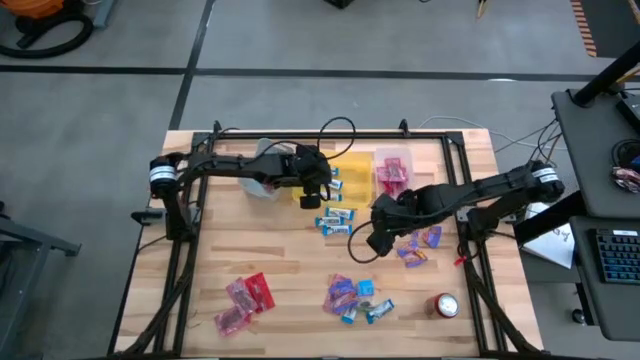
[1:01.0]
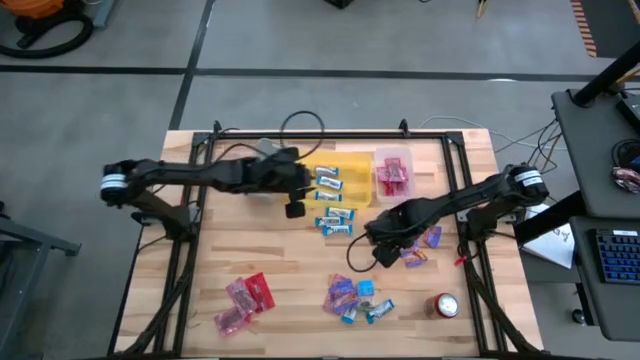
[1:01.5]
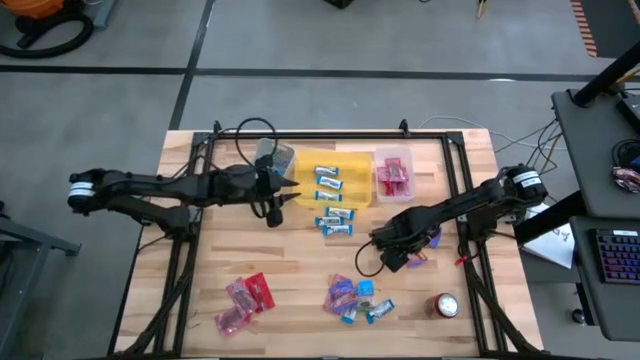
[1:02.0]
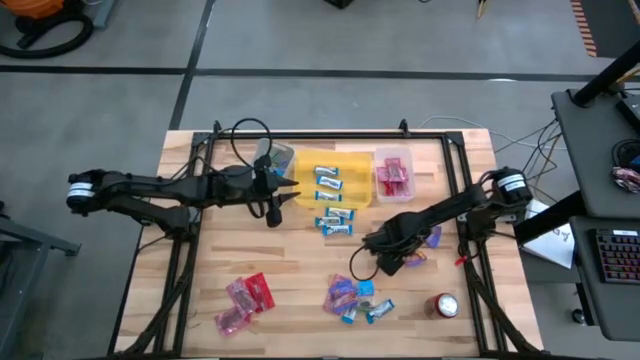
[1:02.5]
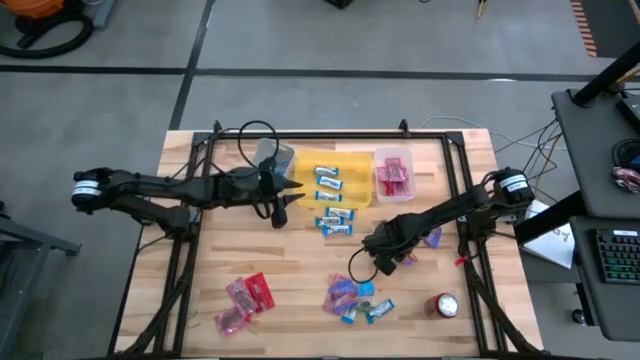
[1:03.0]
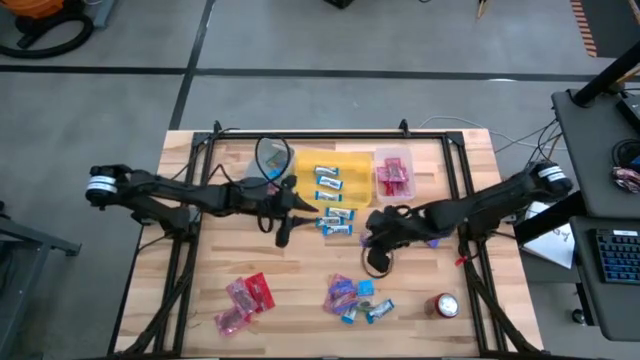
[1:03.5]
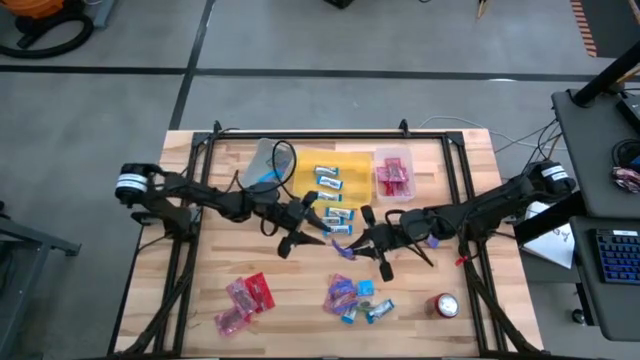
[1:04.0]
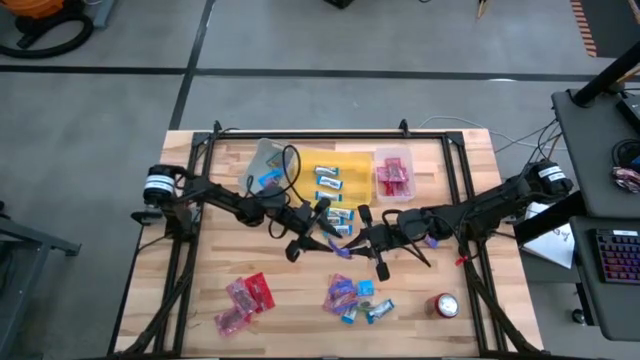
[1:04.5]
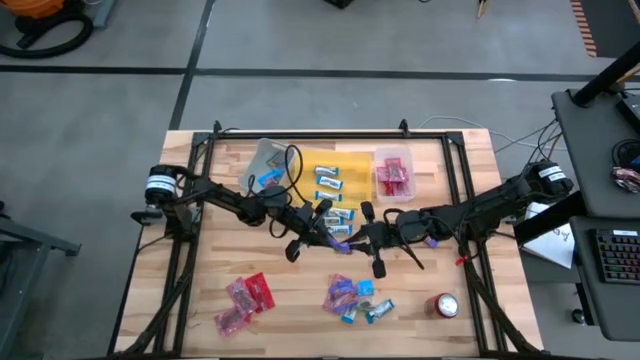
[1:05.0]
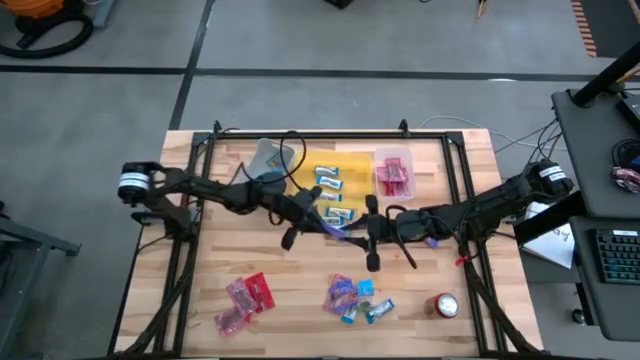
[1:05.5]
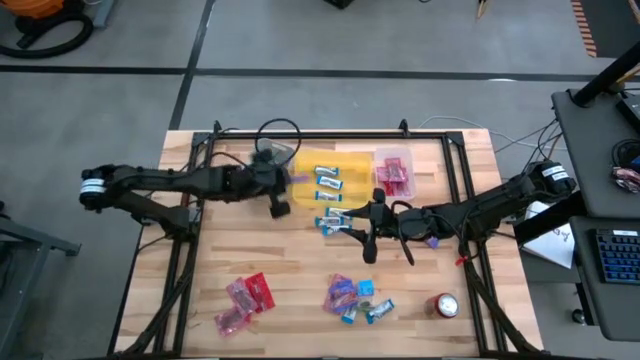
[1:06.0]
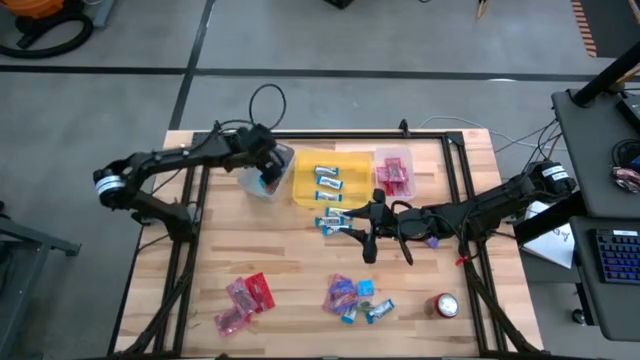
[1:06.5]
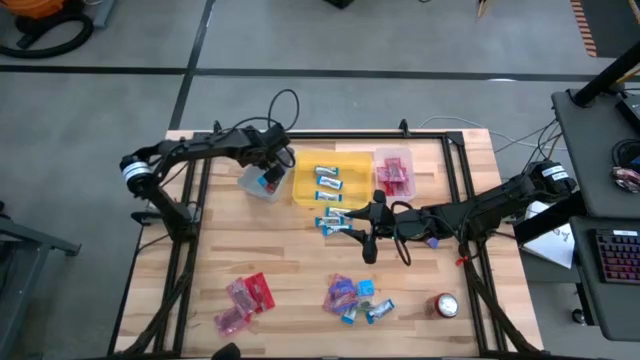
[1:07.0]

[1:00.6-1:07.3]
Task: Sort candy
Put the blue candy into the gray bin

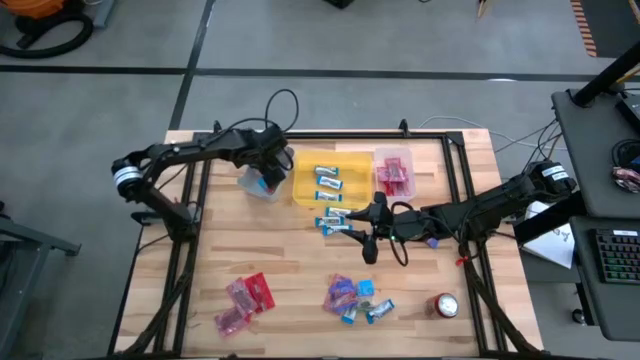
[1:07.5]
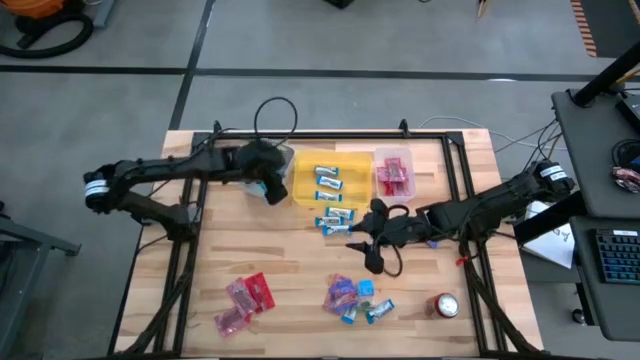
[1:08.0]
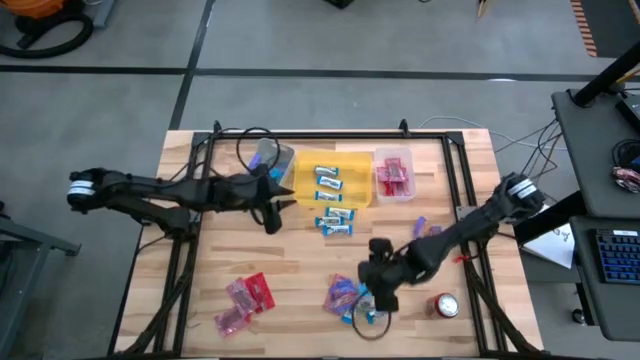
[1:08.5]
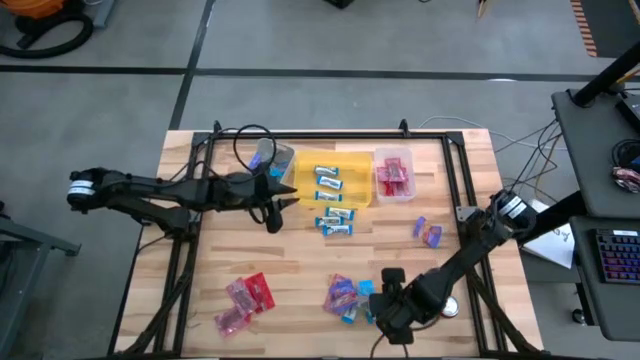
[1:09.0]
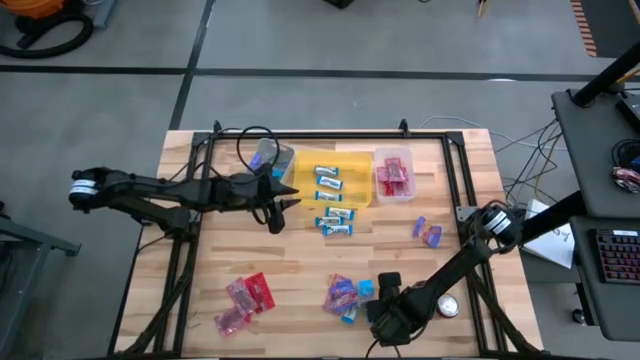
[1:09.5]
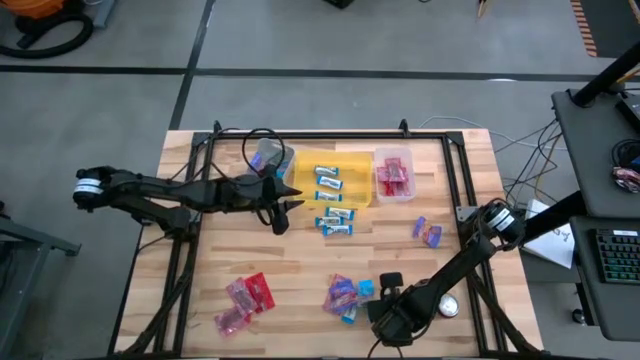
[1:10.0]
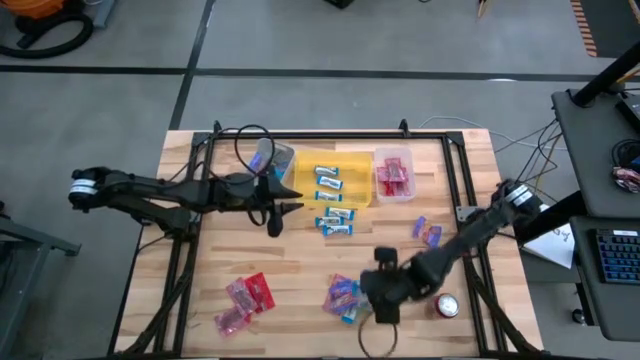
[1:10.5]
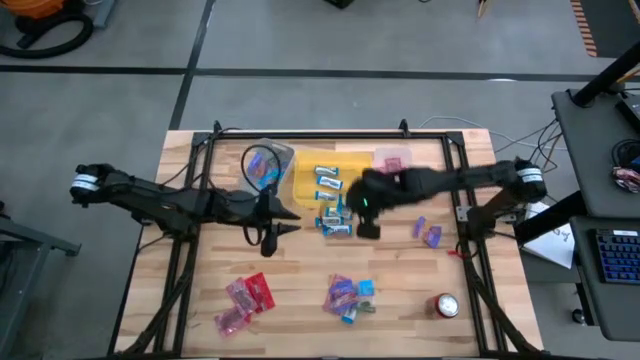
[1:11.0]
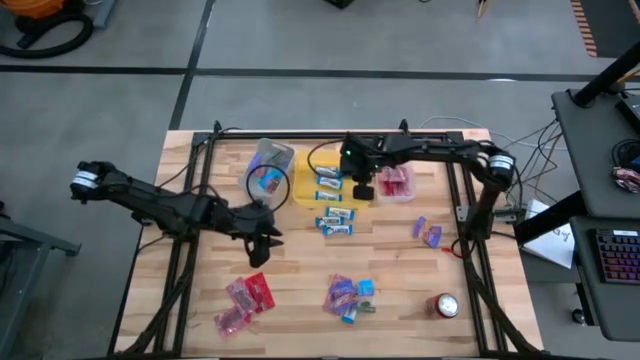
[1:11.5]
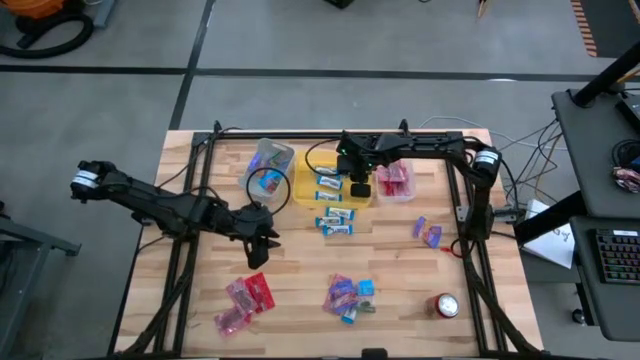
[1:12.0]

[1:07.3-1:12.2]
Put the white chocolate into the yellow bin

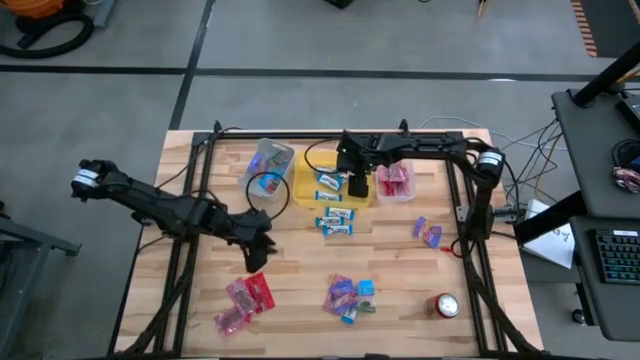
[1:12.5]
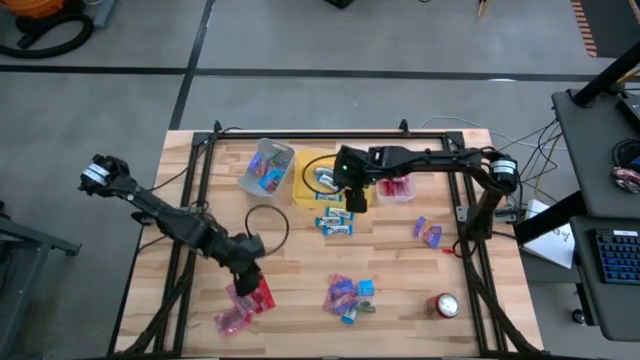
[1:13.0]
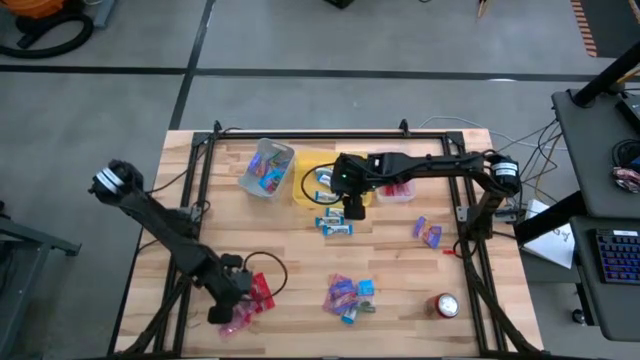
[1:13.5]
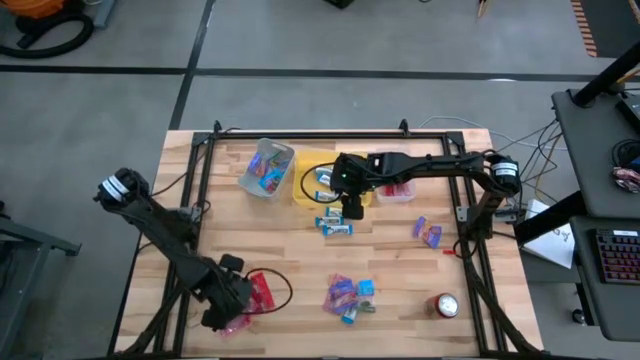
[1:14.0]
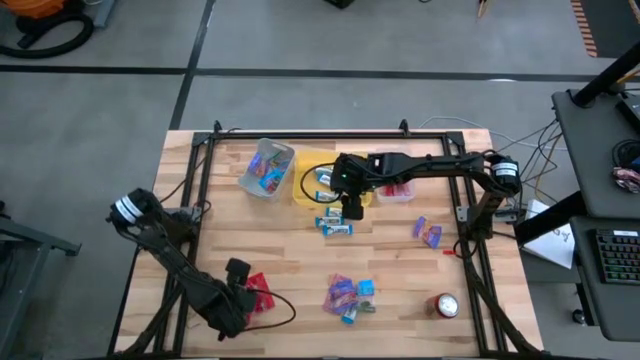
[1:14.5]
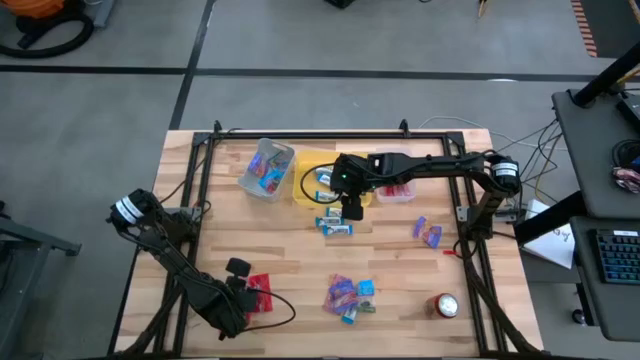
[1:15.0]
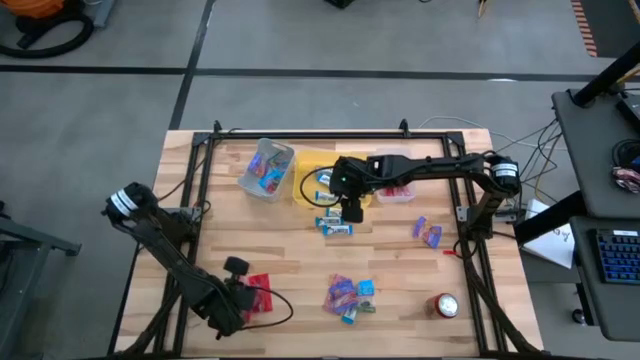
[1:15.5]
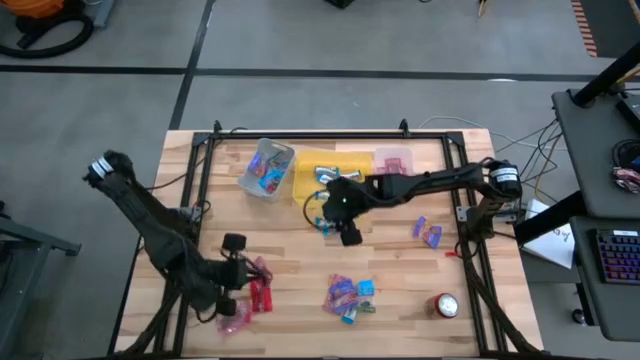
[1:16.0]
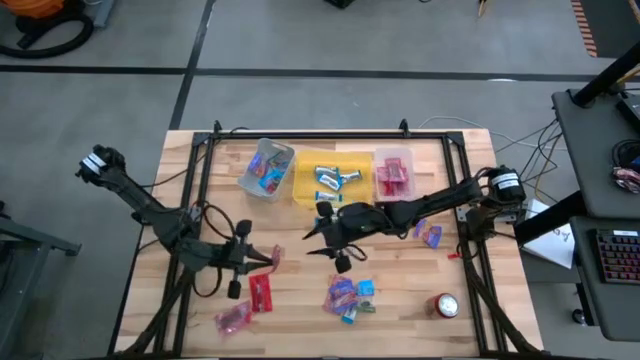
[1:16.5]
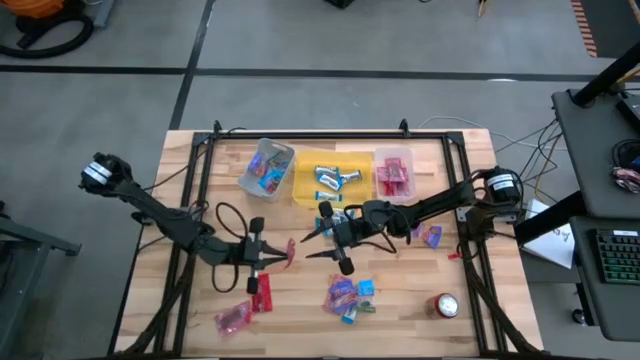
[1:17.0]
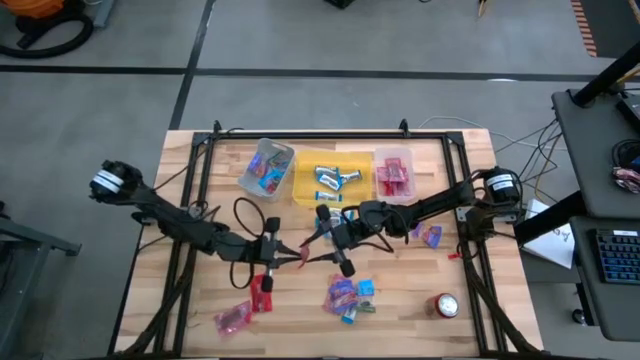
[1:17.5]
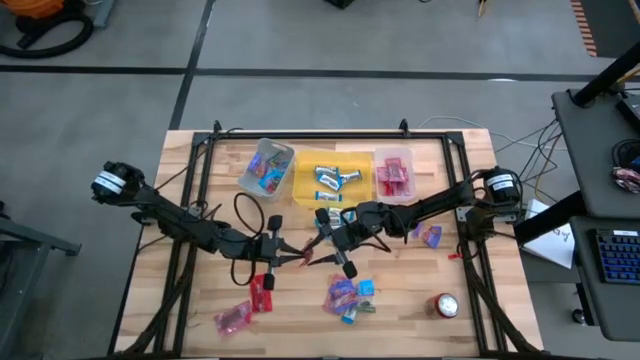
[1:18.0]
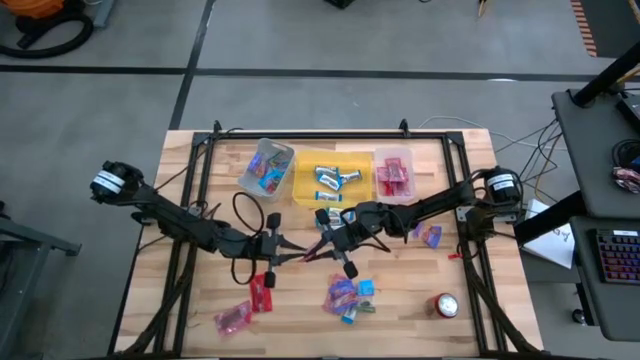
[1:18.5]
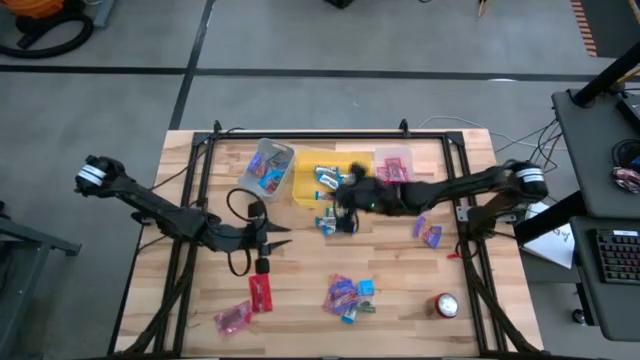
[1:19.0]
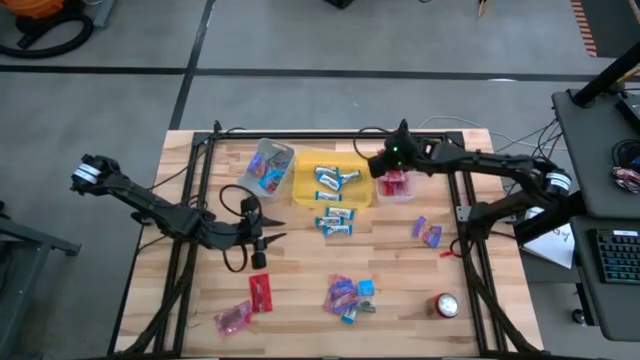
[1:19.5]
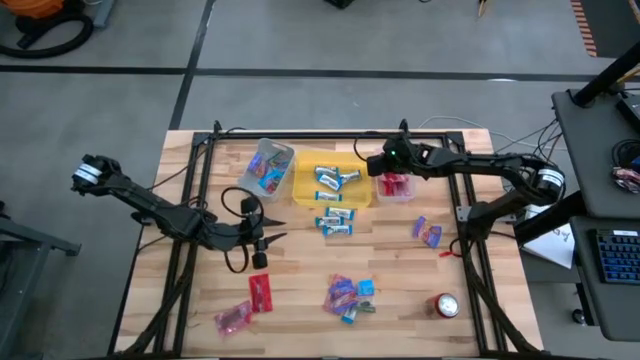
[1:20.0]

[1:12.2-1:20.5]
Put the red candy into the transparent bin

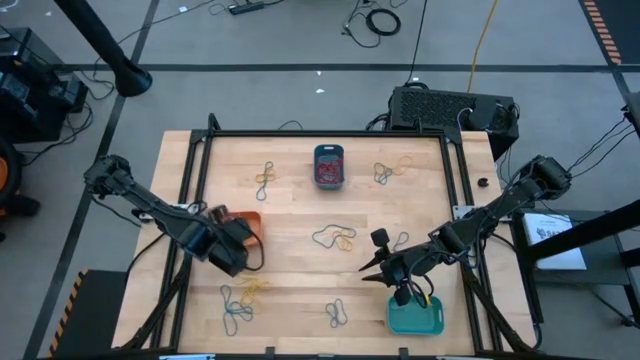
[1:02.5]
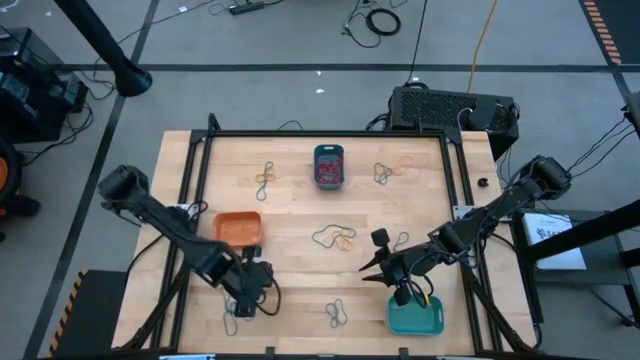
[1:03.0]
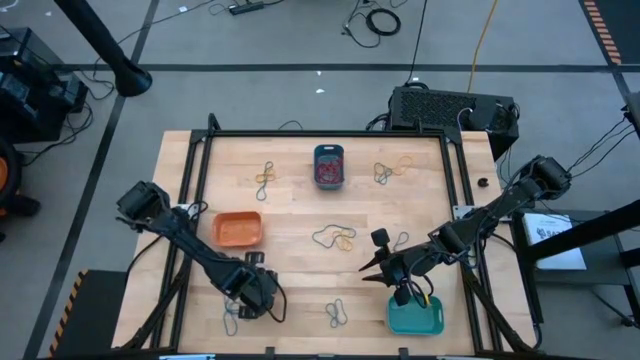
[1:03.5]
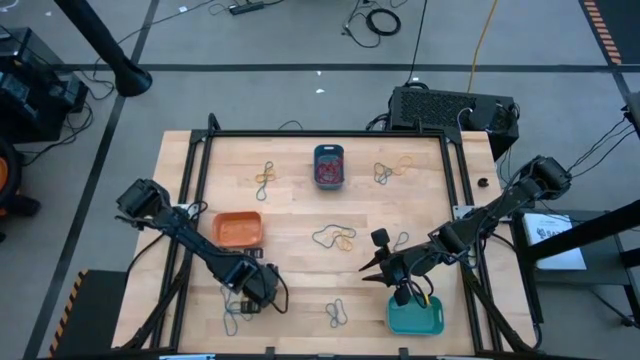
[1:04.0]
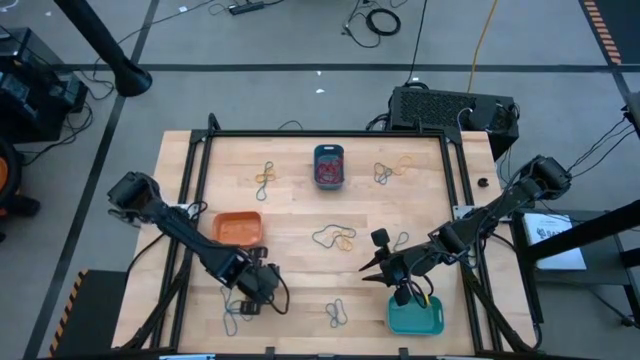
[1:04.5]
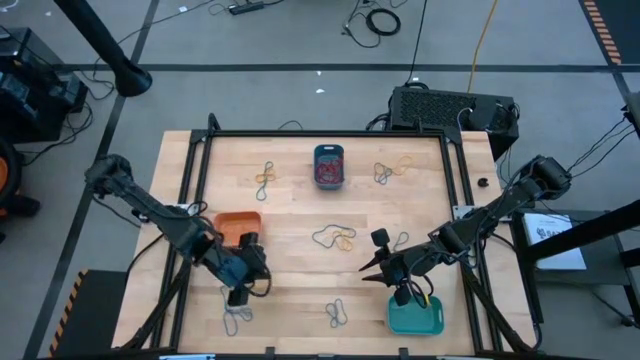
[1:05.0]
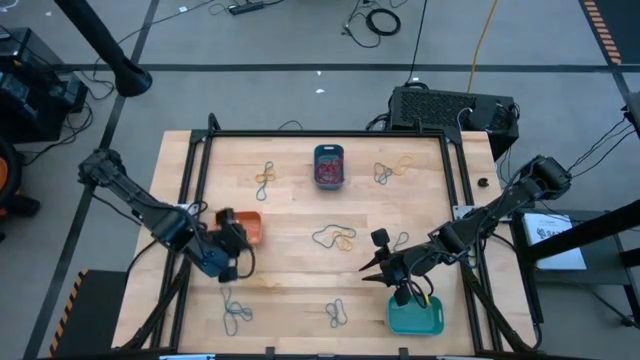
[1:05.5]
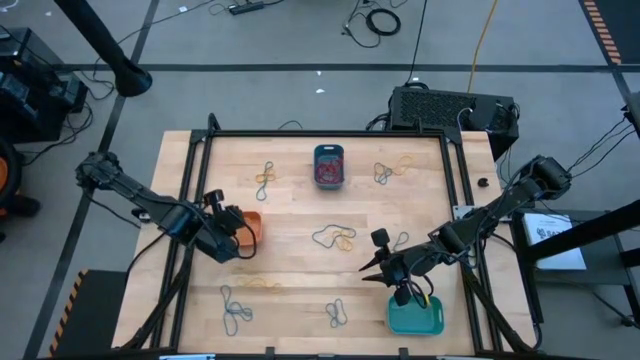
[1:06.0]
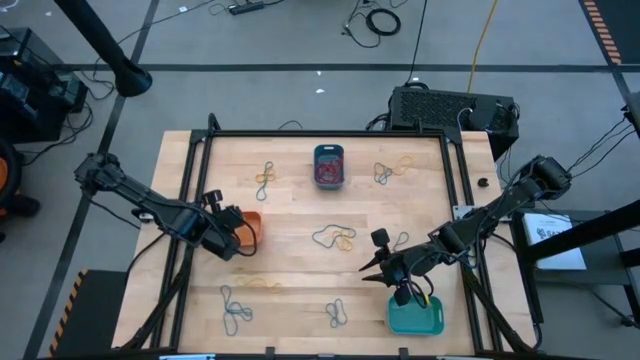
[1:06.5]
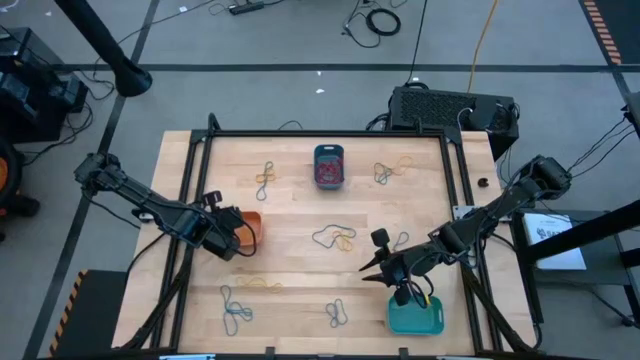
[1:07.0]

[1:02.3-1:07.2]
Task: Sort rubber bands into baskets
Put the bottom left yellow rubber band into the orange bin
